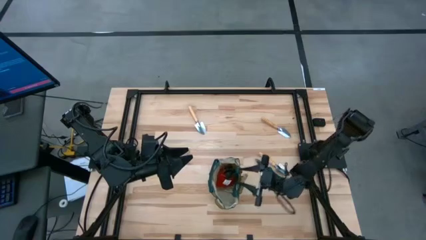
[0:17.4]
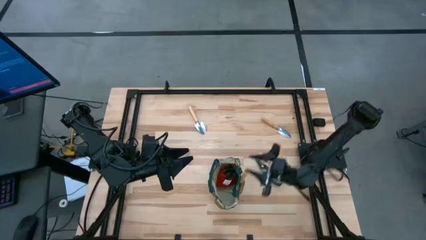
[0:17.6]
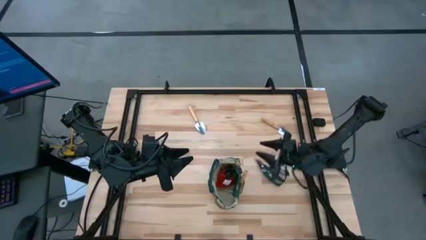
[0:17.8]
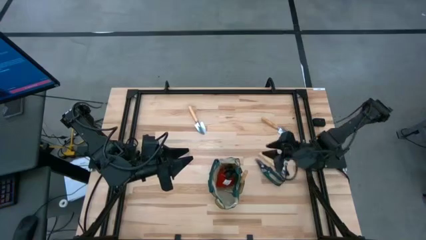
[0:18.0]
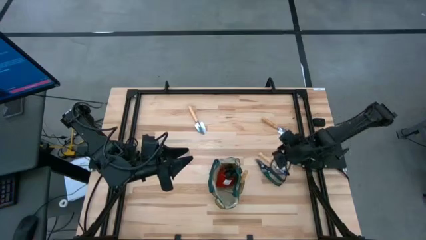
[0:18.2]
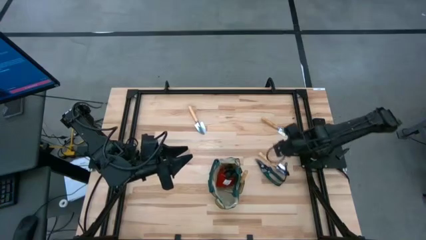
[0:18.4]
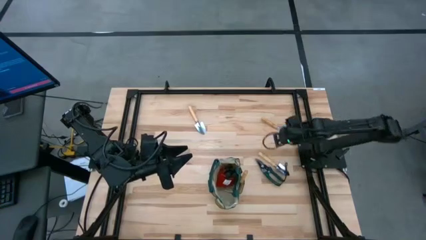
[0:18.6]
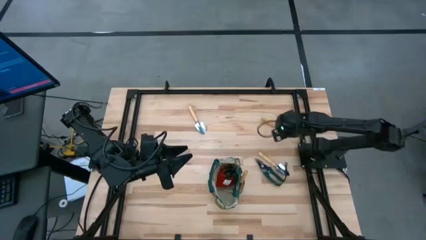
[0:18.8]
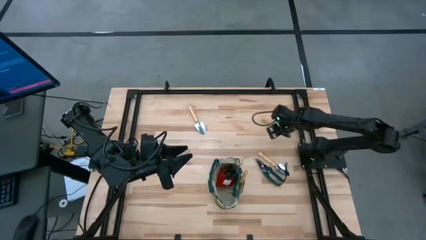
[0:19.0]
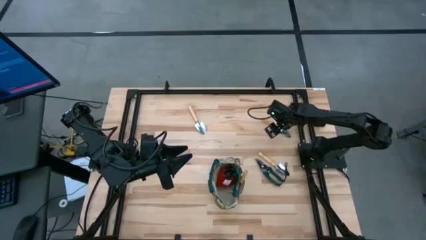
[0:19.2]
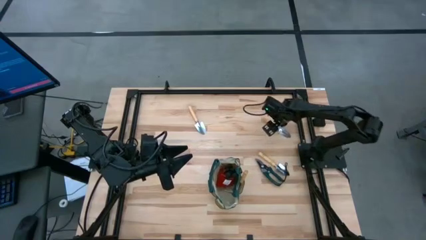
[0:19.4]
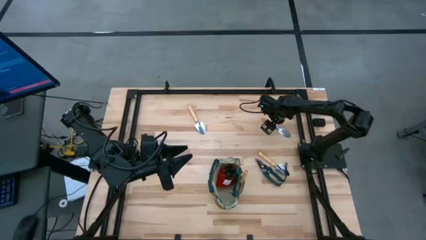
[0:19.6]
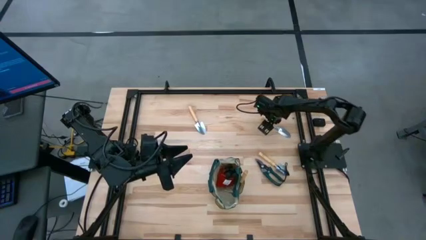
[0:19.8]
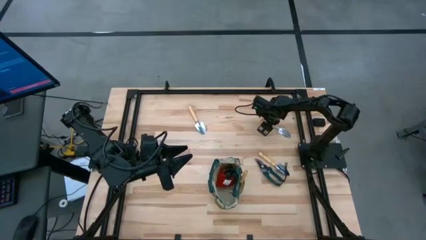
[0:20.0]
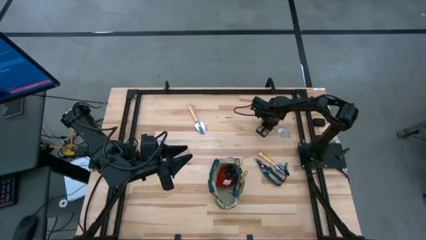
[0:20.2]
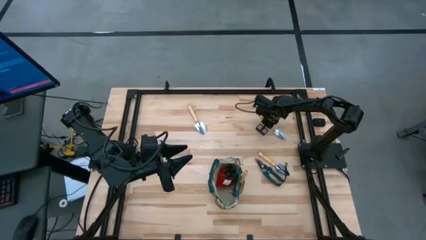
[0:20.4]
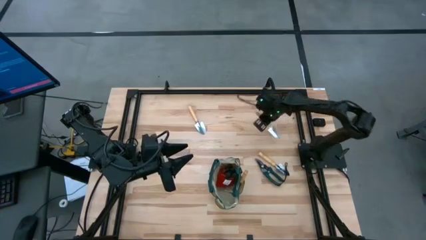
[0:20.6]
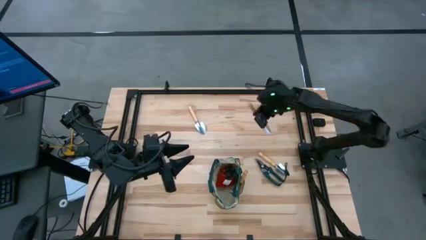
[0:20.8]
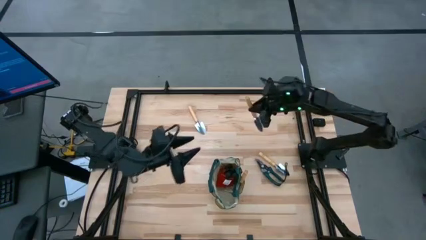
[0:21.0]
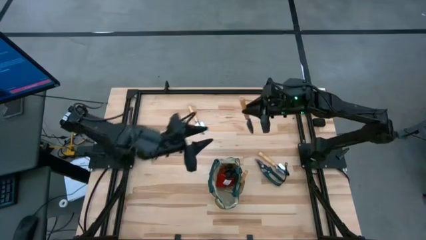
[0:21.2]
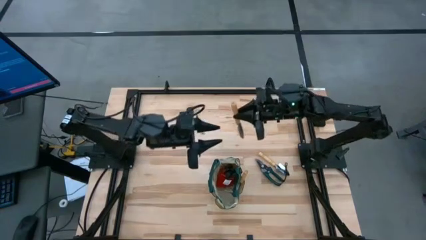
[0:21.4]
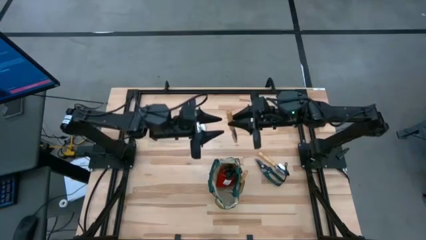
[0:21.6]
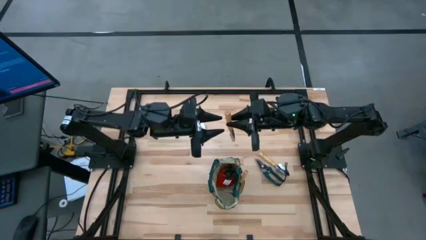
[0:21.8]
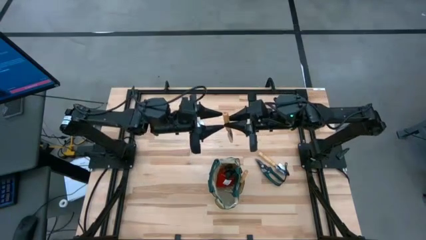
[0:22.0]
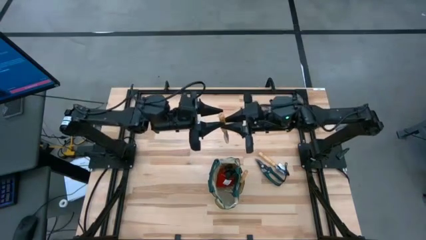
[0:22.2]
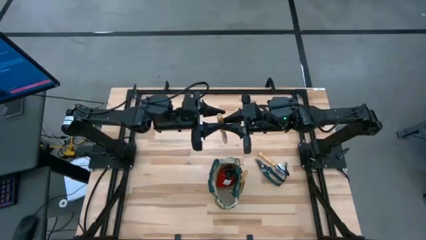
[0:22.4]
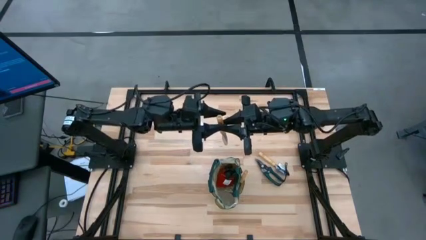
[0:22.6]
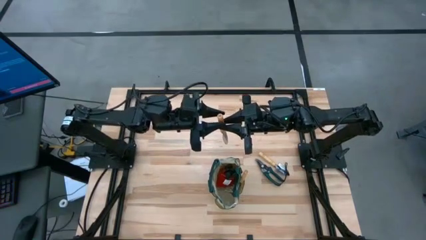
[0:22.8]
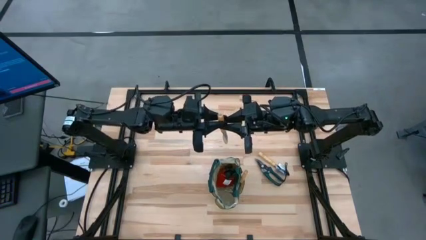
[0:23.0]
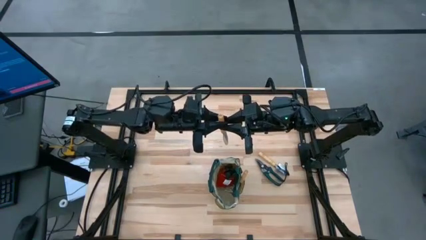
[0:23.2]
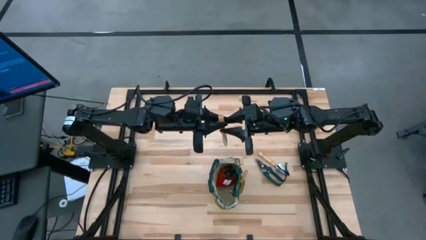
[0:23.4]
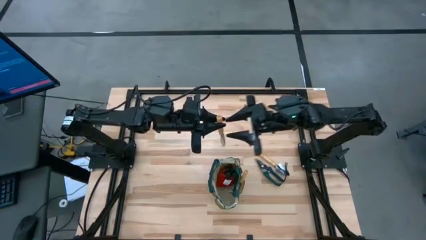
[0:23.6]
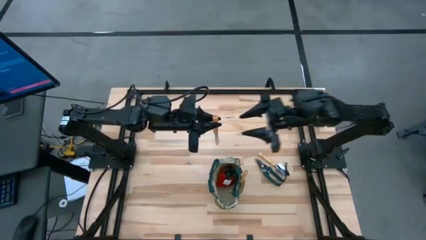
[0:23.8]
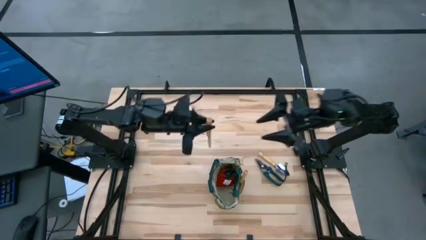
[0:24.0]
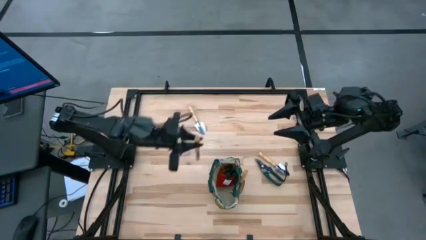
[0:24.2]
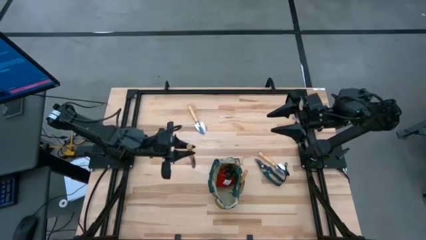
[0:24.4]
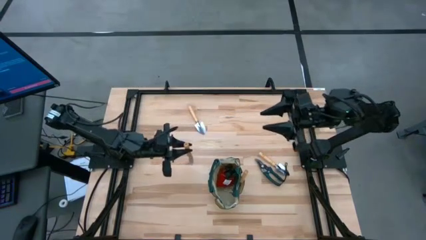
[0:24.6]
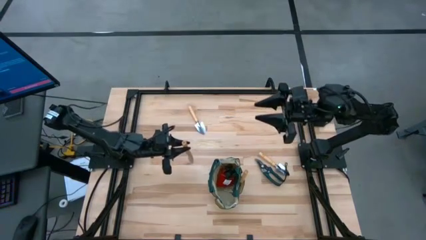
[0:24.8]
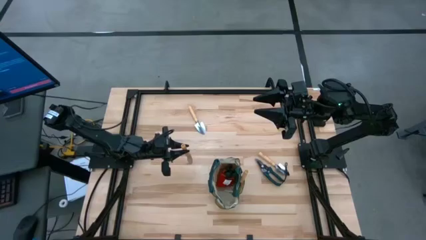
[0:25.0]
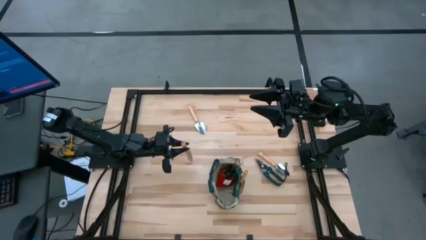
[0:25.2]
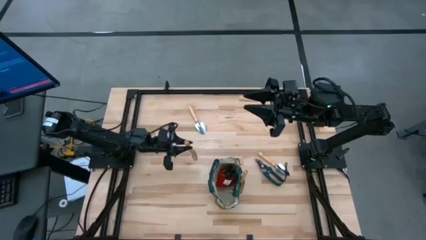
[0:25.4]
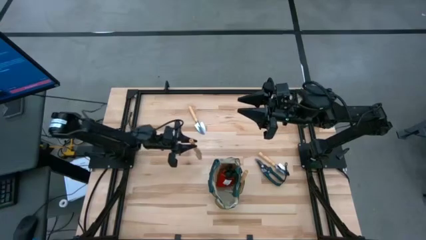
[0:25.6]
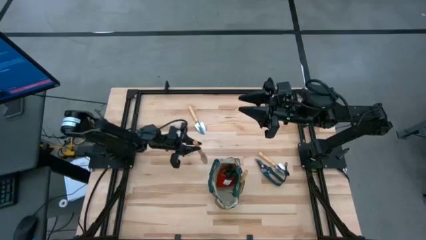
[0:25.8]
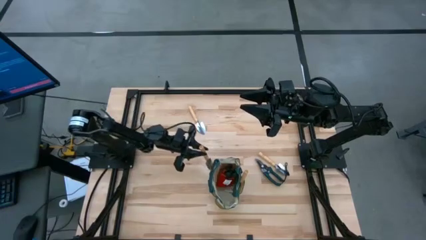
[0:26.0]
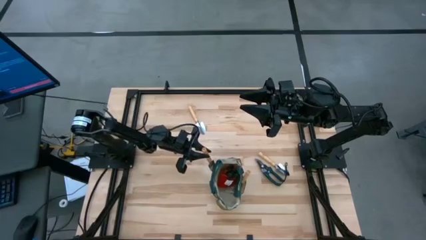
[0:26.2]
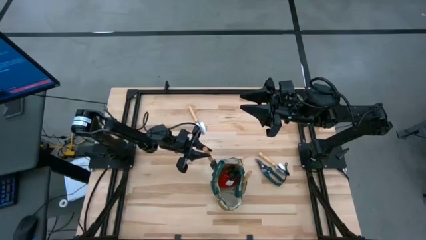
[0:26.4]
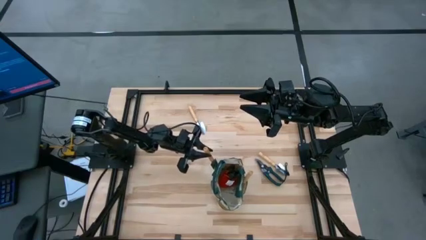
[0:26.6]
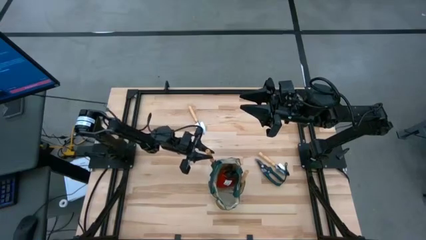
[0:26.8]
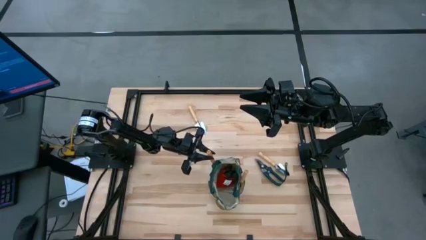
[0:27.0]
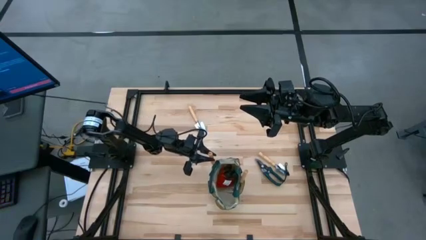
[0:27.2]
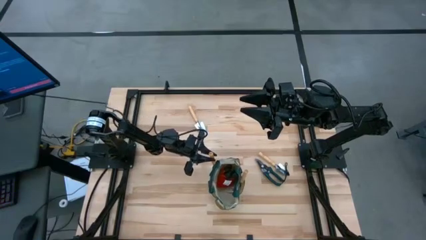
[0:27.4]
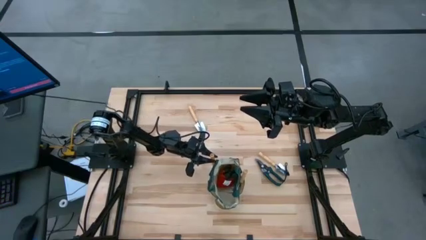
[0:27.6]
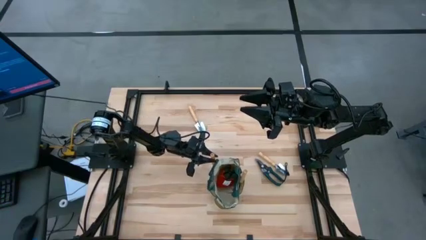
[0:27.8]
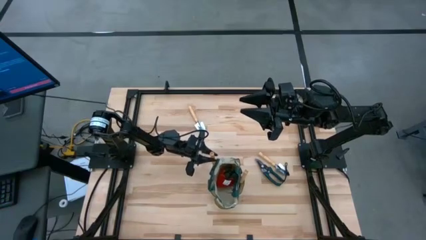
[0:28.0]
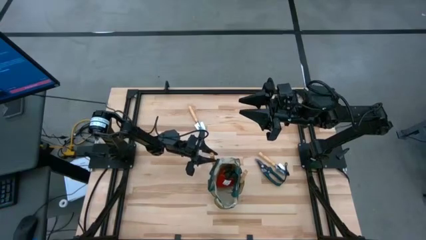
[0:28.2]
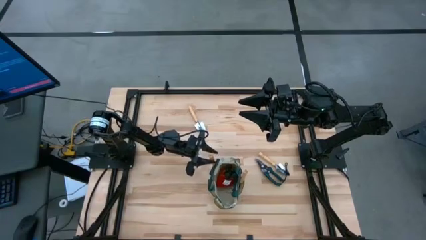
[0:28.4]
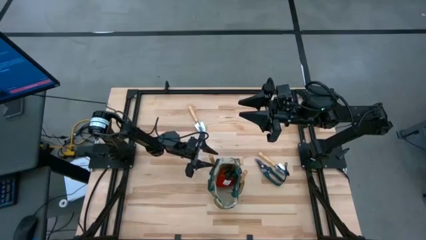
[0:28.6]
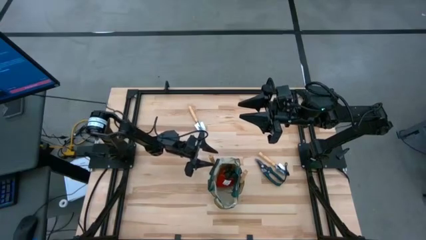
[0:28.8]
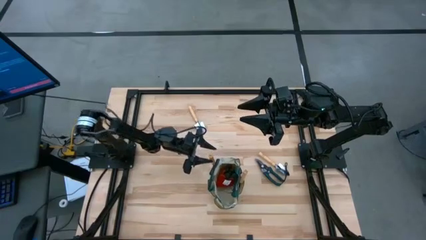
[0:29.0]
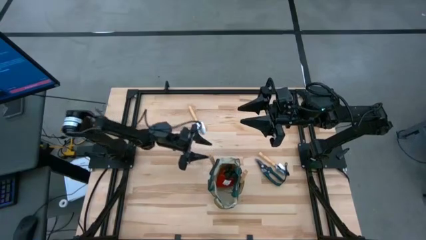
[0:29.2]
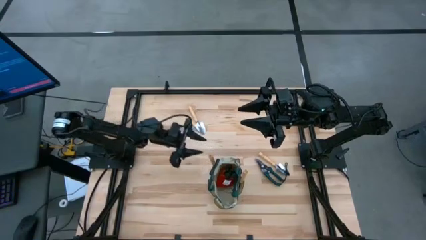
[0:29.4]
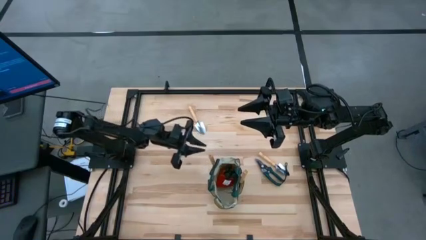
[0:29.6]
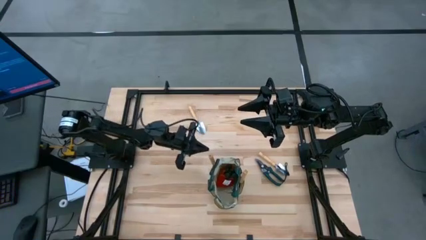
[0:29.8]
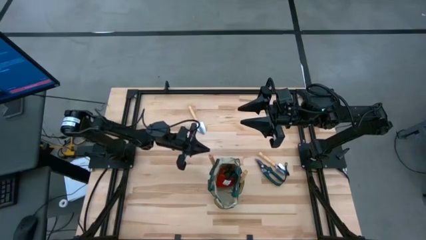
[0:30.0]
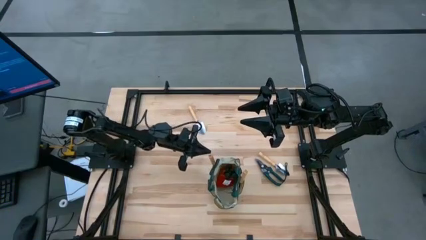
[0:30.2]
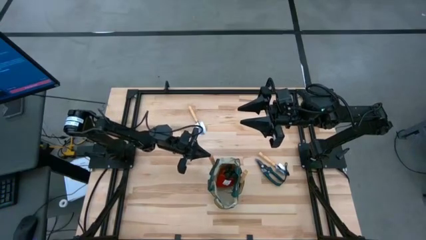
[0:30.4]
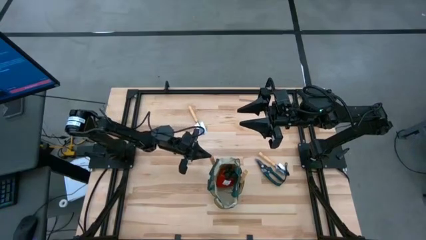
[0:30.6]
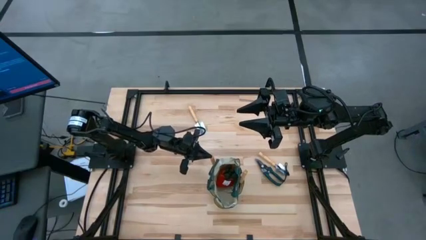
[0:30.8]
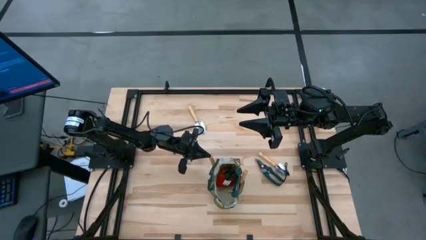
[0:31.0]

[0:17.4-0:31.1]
Task: Pick & Place Garden tools in Gardening bag
Put the brown trowel into the green gardening bag
